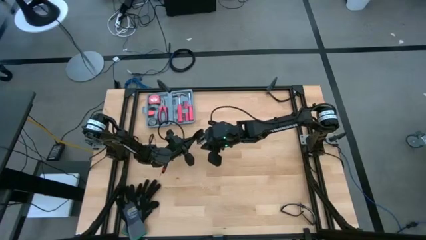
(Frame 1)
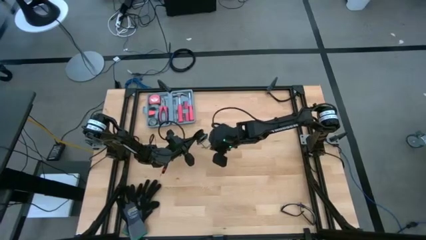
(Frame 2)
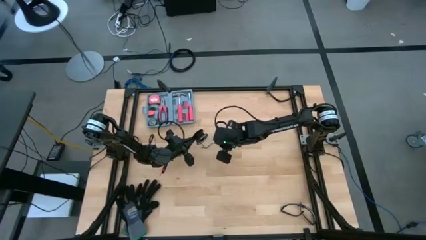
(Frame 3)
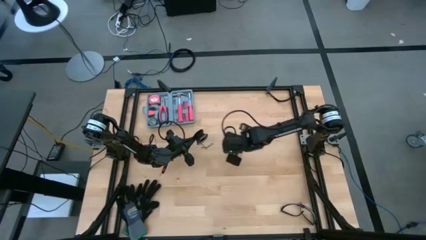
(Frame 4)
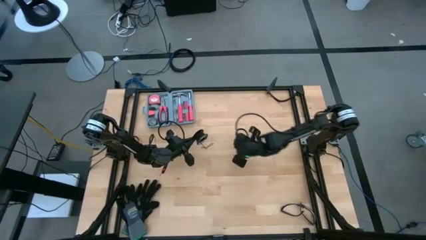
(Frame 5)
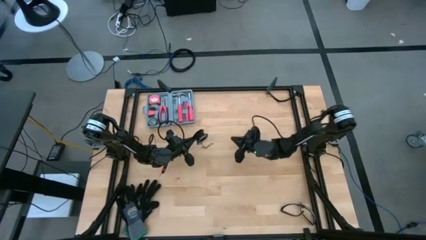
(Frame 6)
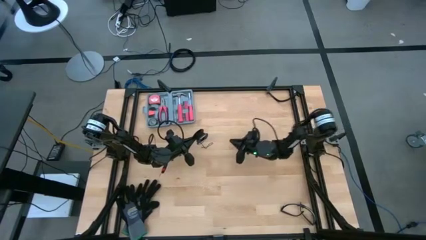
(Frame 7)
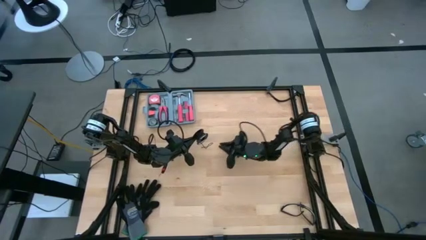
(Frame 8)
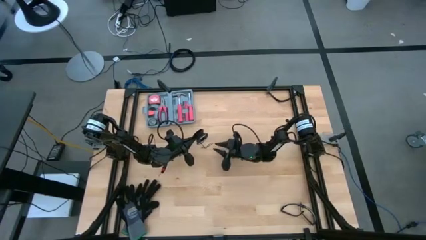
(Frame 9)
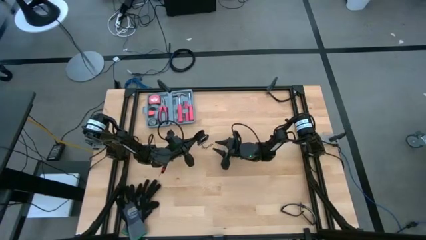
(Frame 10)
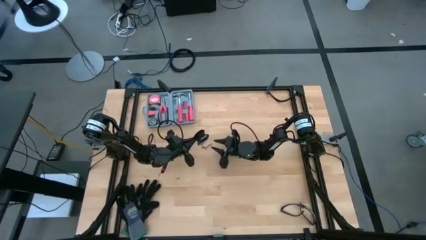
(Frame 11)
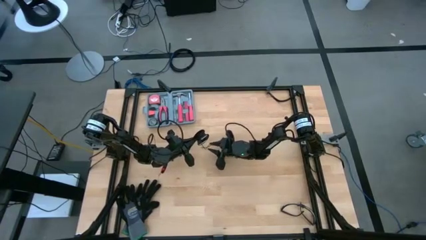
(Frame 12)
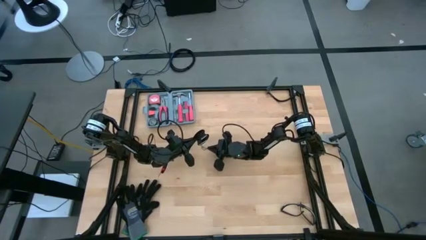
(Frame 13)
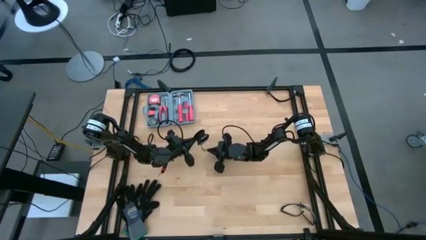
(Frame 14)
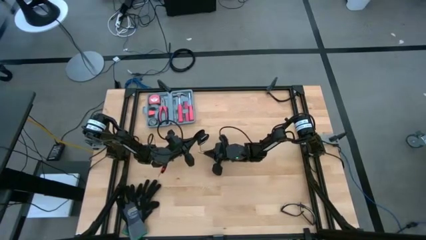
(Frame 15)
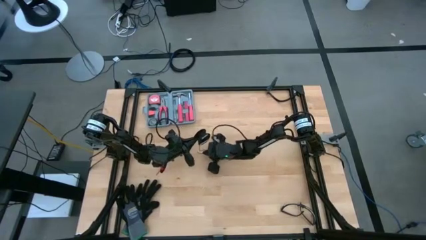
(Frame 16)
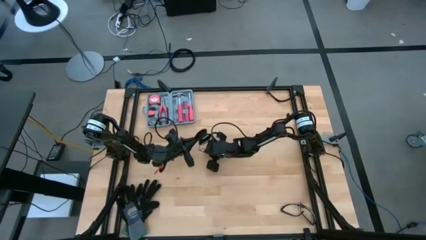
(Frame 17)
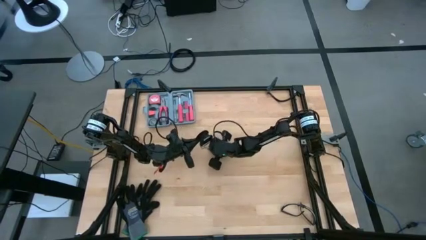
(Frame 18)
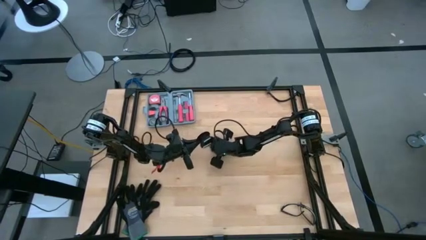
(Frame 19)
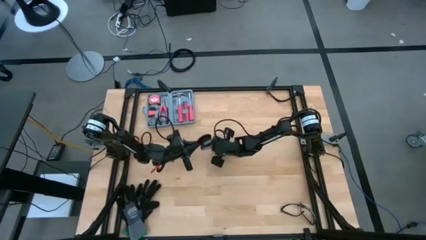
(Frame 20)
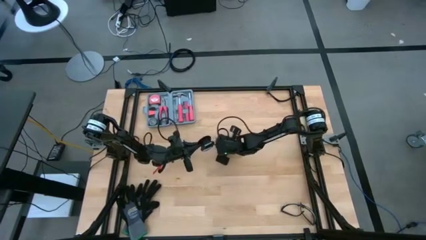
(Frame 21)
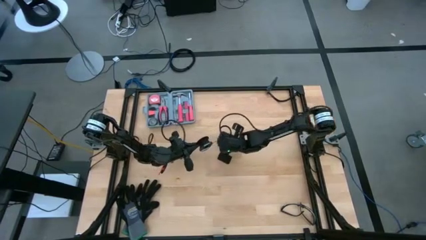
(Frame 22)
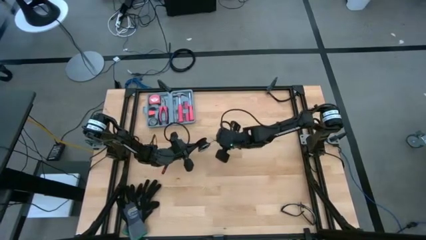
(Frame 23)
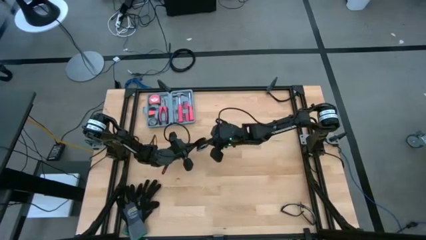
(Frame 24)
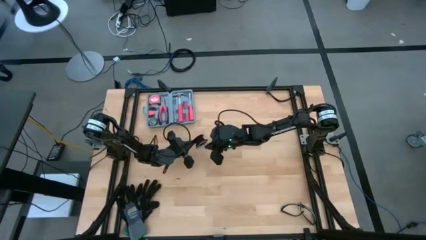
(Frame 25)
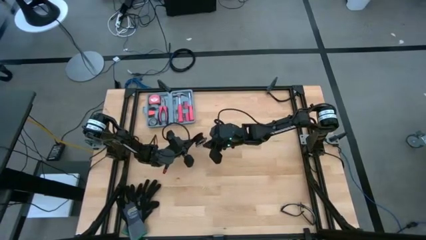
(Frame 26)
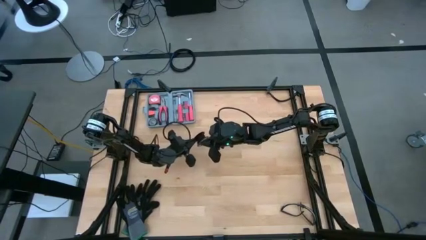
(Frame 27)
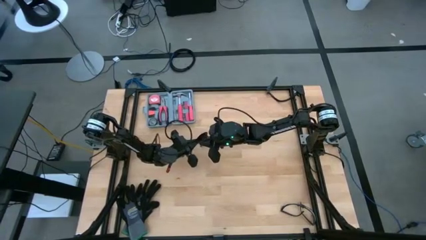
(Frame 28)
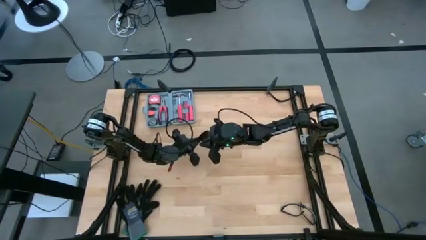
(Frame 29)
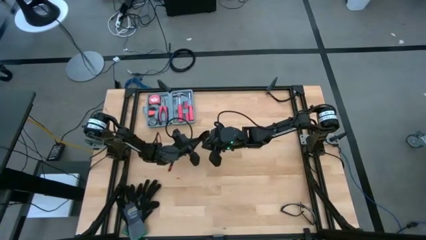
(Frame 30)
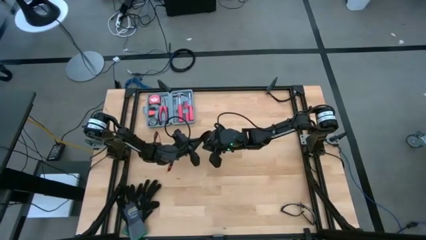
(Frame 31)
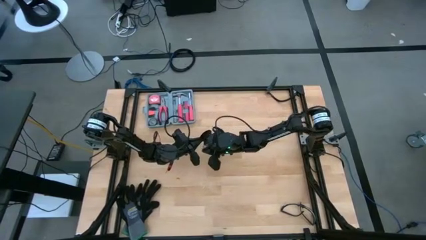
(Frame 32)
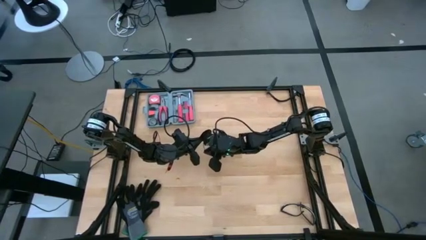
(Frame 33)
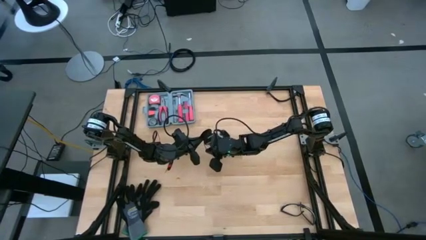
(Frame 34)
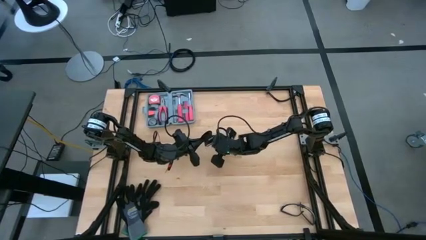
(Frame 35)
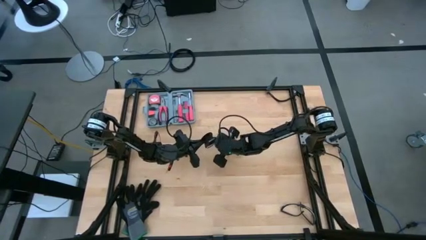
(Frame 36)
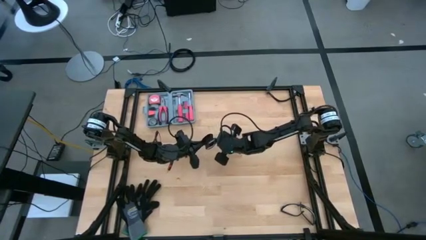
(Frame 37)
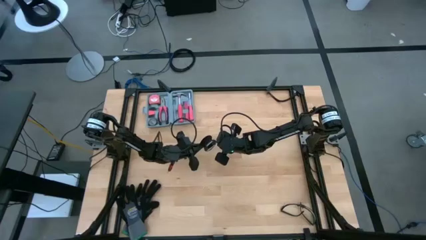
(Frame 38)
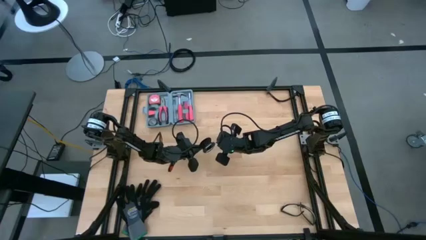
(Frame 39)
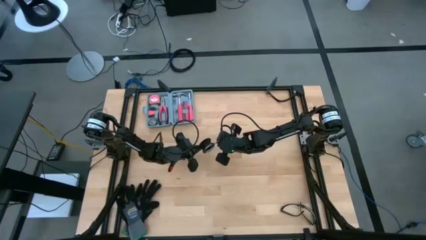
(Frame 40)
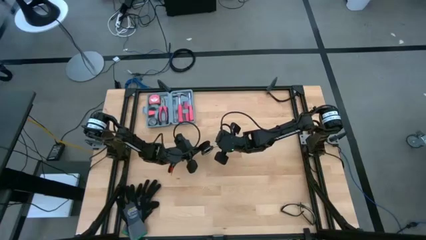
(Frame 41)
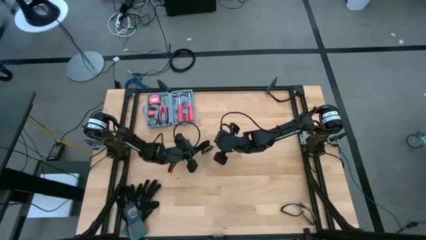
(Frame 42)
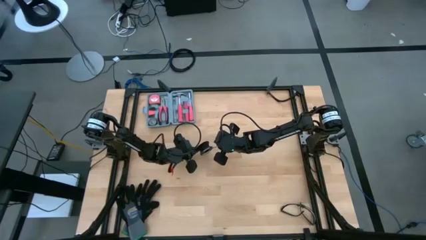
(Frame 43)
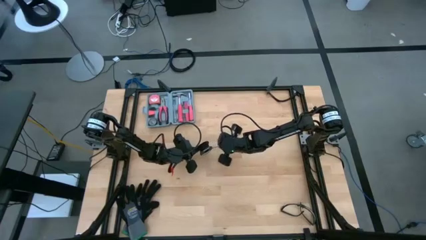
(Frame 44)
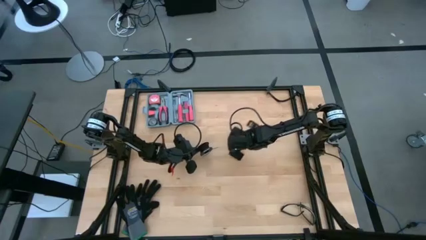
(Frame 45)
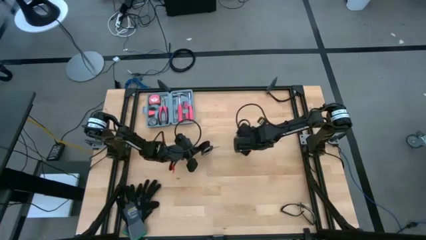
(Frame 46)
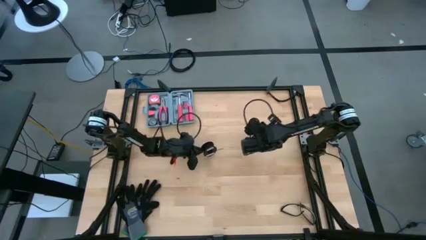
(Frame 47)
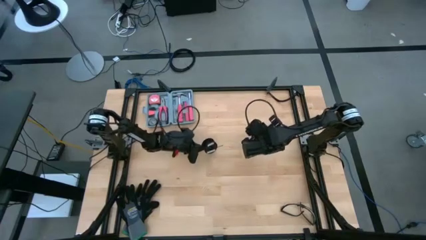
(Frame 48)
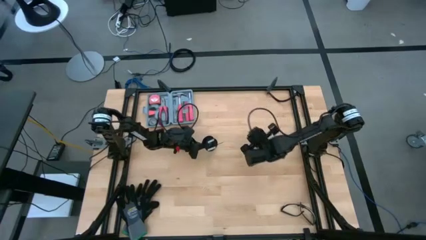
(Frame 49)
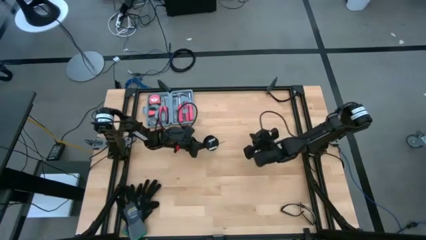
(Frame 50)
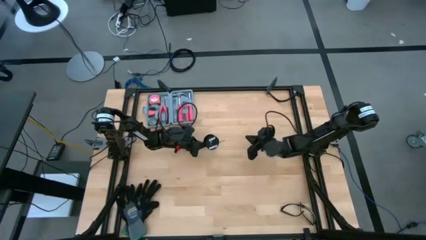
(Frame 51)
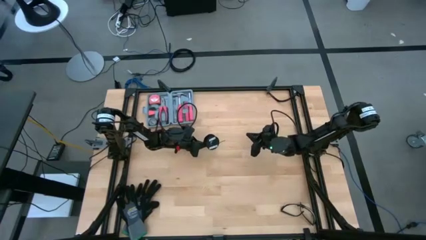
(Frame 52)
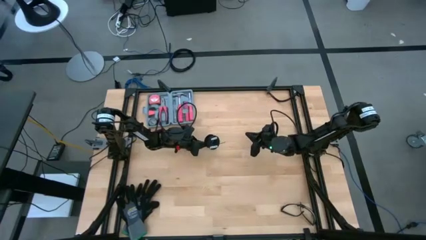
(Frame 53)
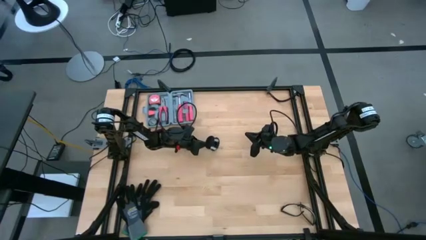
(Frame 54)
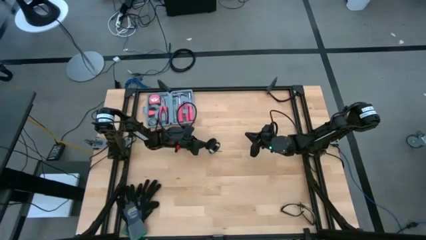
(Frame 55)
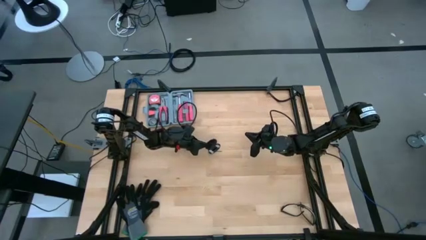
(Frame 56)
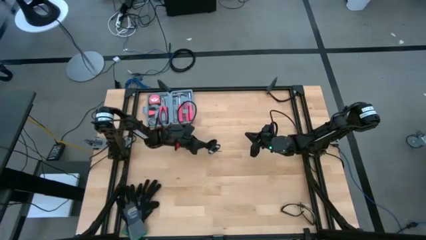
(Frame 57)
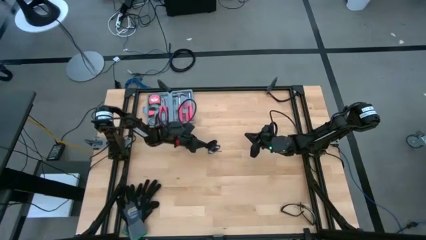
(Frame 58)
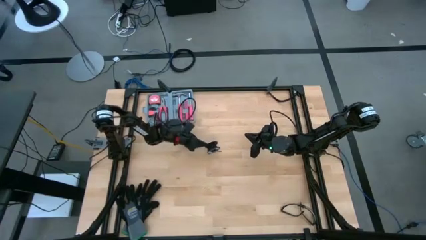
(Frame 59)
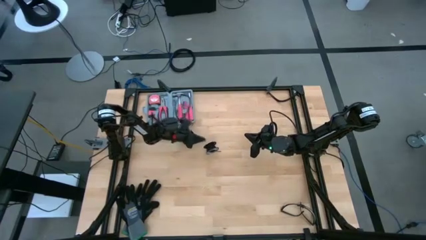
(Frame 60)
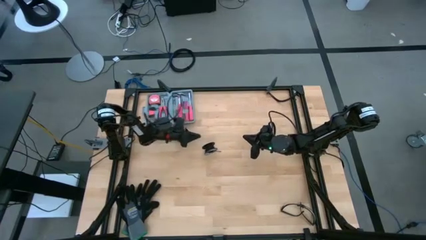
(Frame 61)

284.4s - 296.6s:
Task: Coil cords
Coil the black wire onto the spool

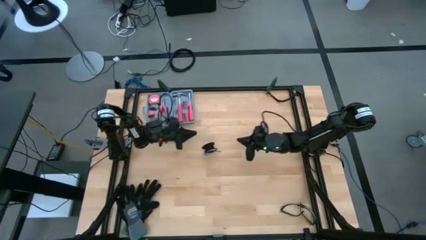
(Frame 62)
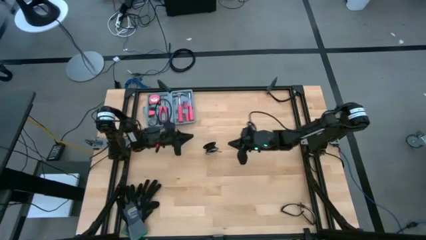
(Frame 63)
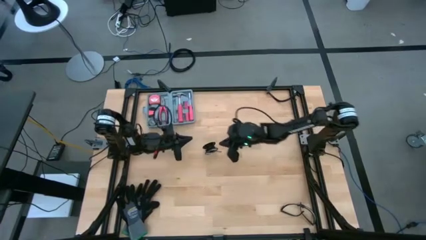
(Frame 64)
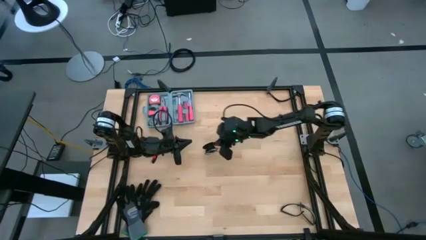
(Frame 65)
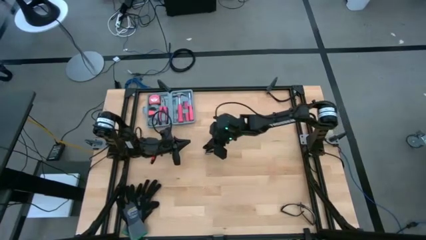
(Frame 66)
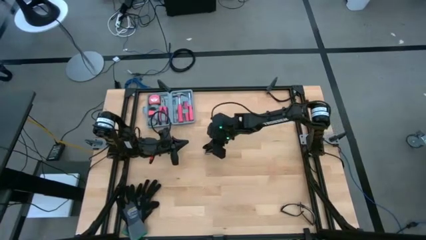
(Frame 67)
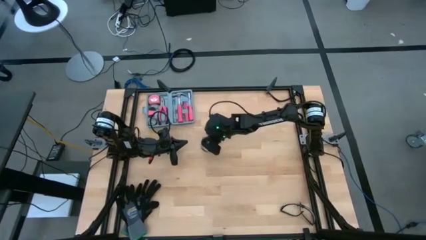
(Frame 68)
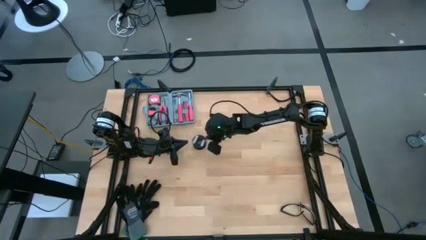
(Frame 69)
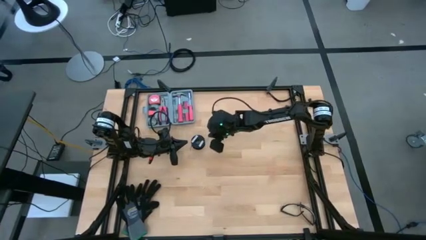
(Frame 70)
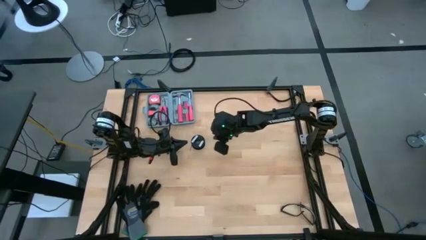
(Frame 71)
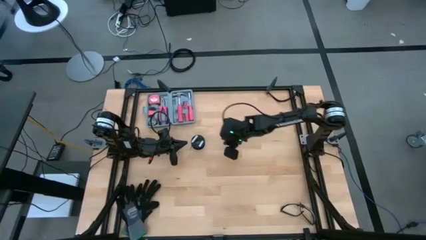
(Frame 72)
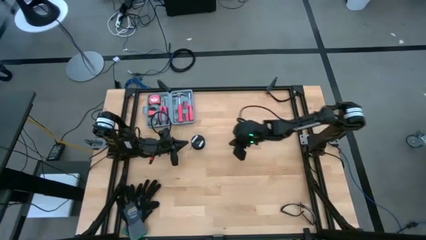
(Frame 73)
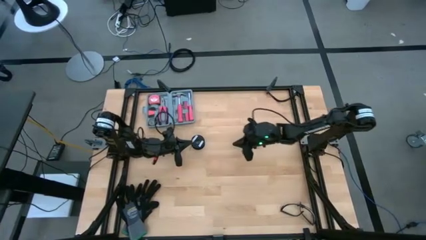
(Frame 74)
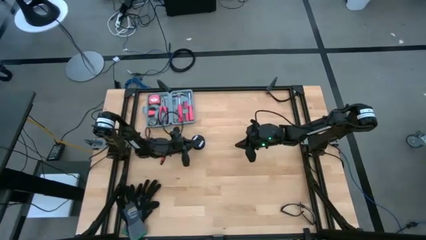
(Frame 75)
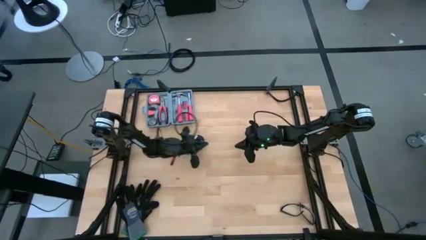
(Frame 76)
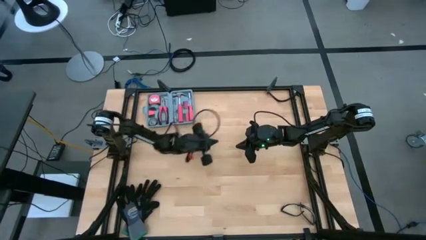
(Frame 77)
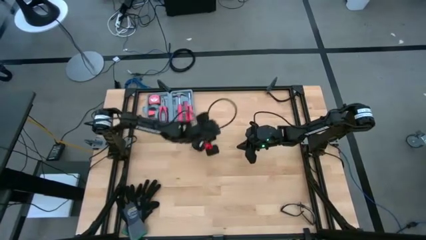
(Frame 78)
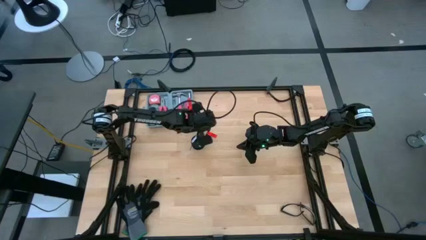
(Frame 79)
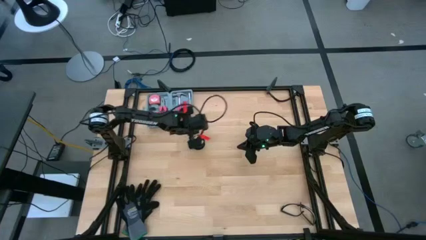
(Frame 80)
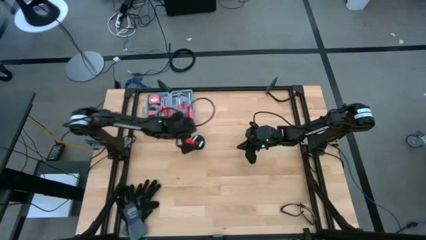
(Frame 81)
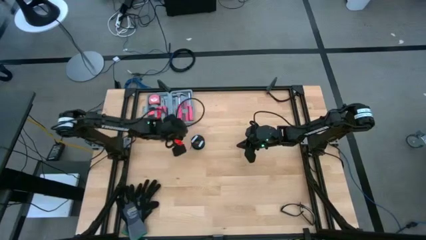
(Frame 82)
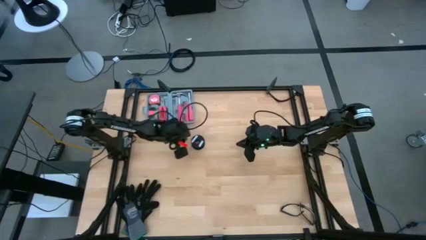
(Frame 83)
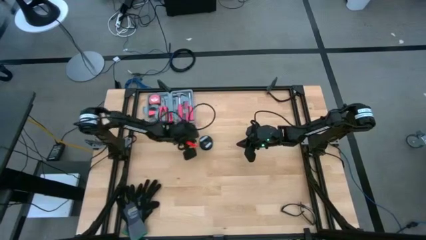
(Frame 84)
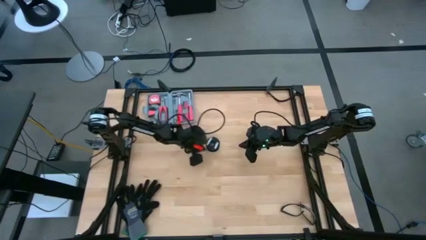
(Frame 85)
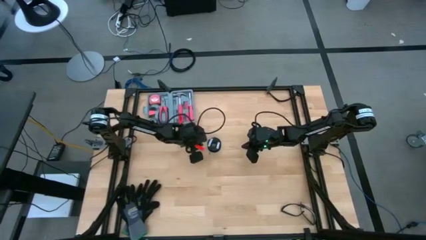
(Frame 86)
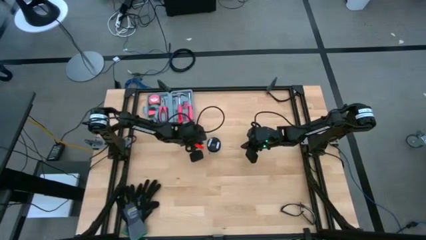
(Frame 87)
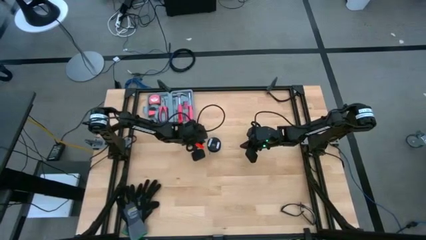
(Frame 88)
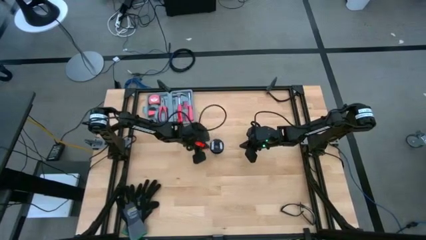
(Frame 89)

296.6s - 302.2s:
Prepare the spool
